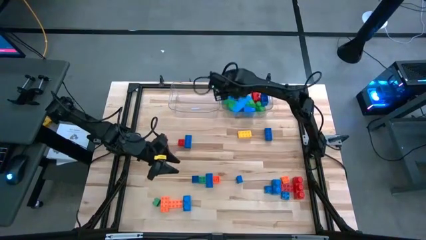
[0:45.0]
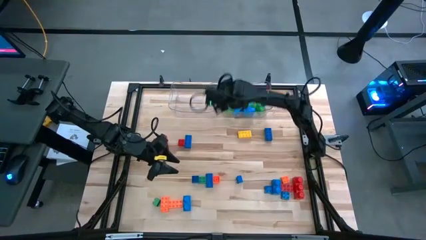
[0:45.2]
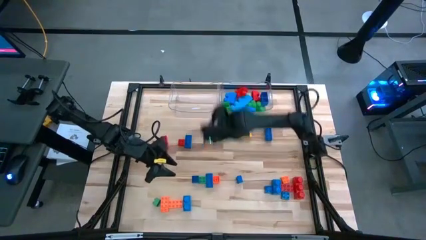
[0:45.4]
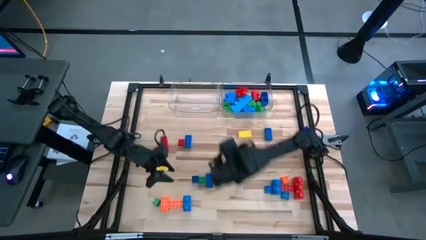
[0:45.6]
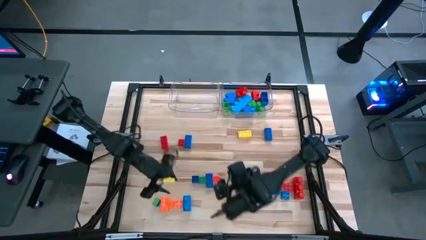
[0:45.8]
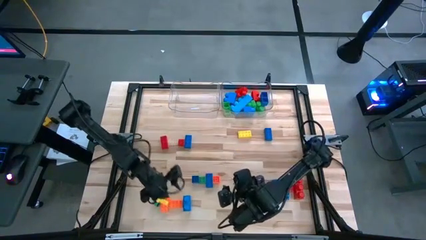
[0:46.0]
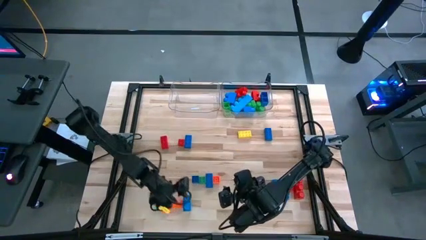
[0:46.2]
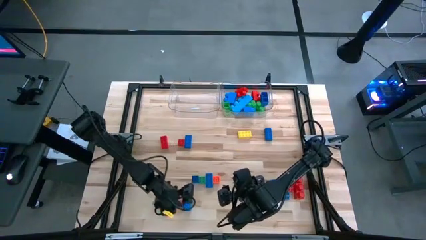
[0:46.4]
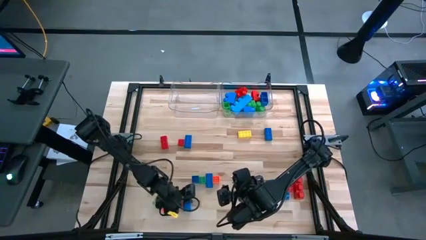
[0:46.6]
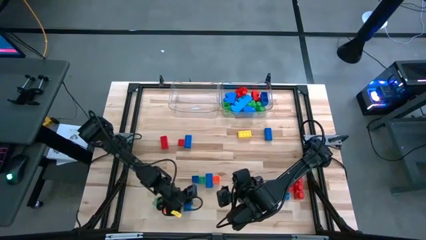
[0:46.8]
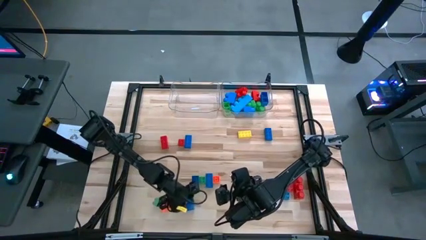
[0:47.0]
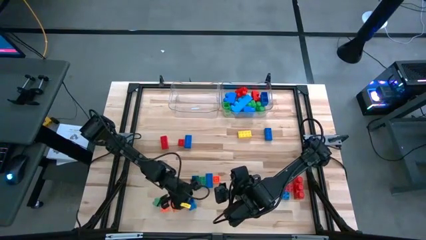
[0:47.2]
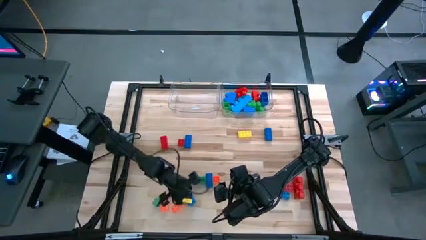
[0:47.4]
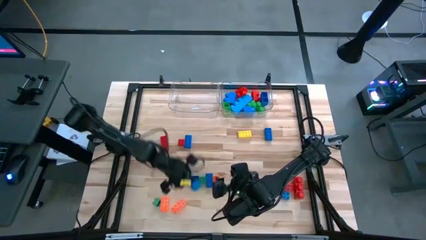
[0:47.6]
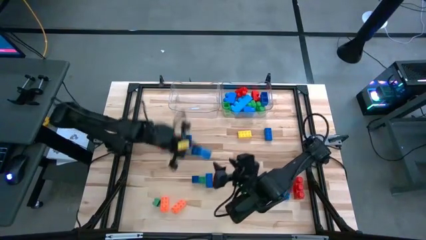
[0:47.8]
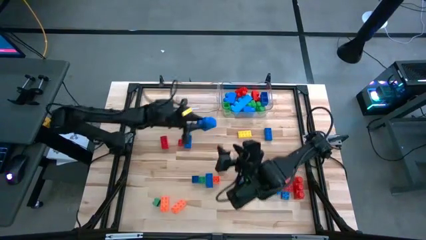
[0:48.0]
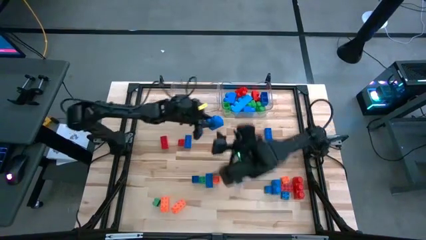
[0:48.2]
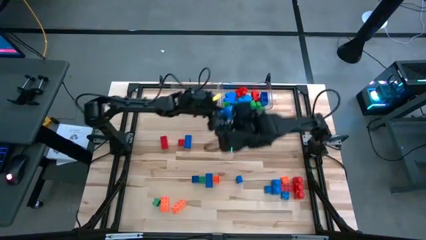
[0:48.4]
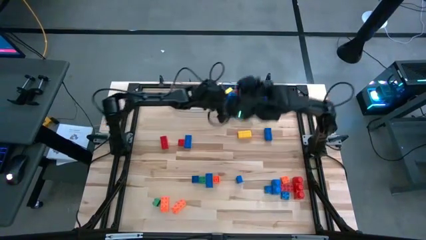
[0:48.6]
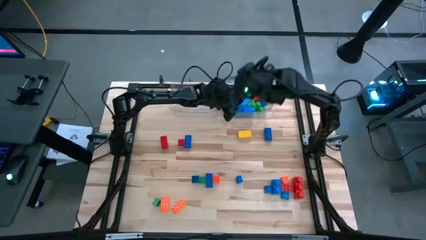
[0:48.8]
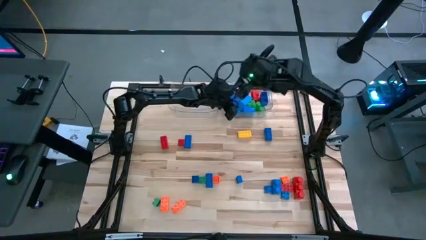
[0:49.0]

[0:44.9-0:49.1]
Task: Sort blocks by size
Put the blue lego piece into the right transparent bin

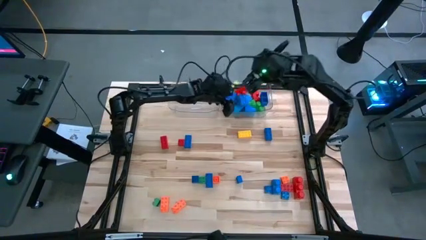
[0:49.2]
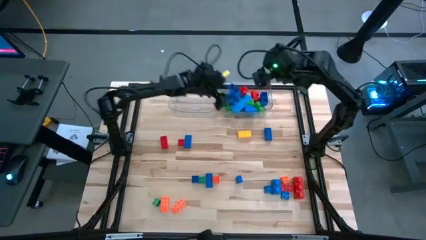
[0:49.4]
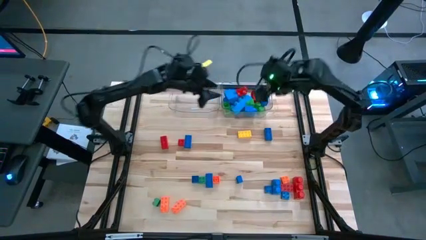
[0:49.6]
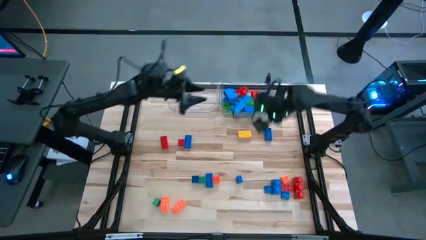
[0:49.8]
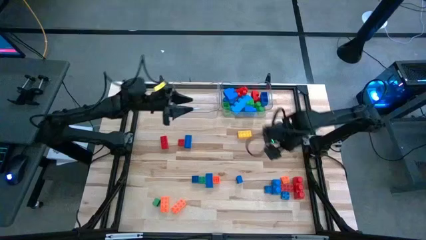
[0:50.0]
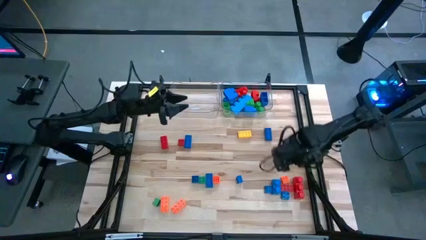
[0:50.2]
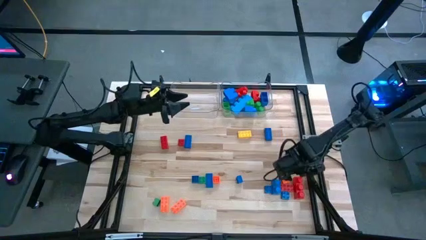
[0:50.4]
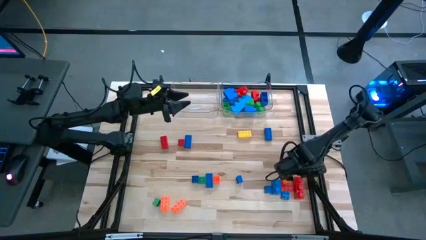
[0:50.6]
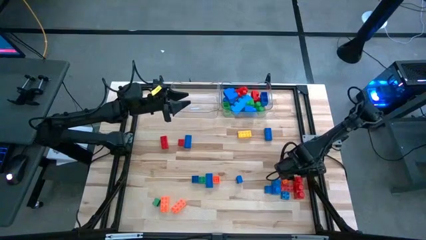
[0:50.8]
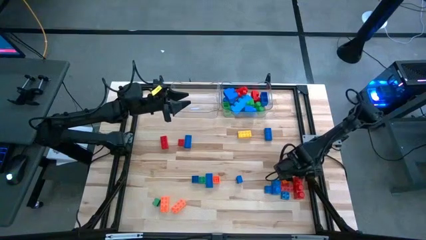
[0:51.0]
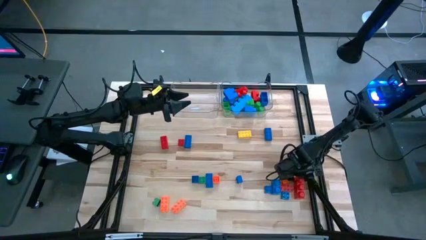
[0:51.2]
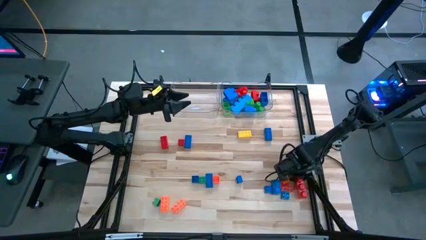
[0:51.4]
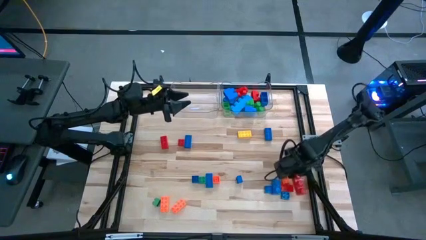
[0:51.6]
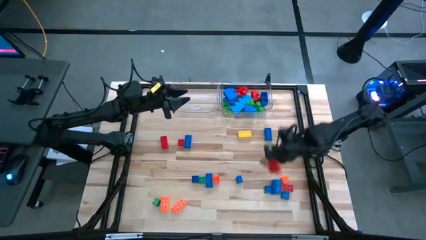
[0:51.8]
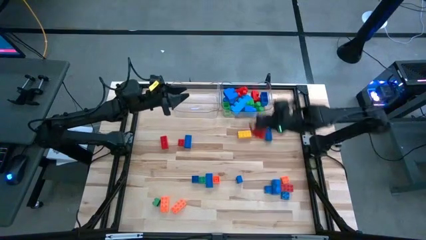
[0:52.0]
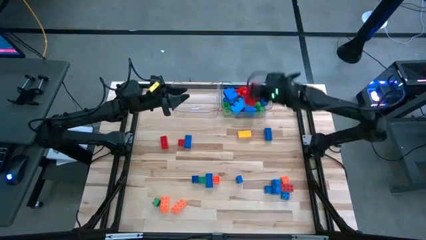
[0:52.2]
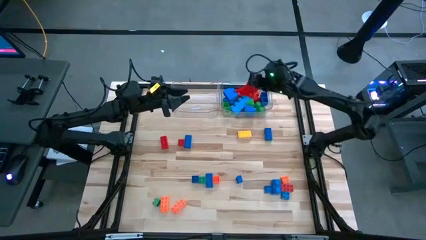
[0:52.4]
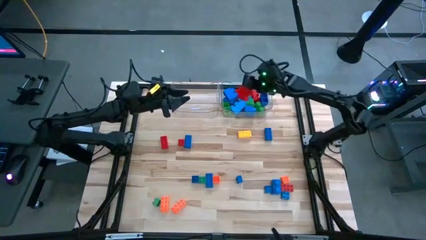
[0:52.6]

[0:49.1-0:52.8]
Put the red lego piece into the right transparent bin

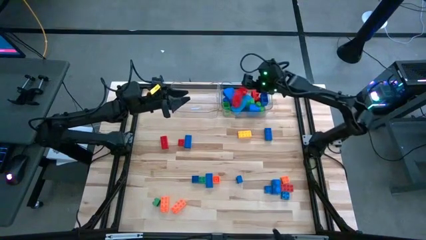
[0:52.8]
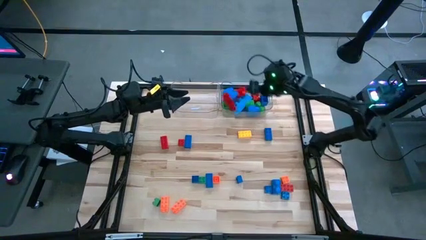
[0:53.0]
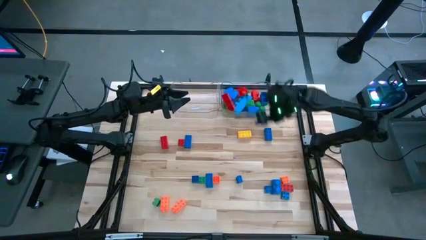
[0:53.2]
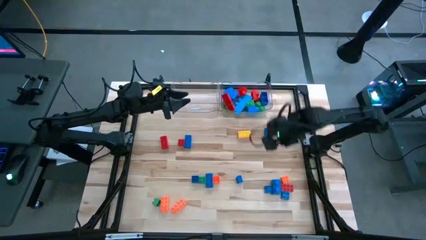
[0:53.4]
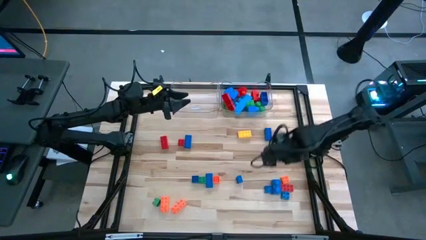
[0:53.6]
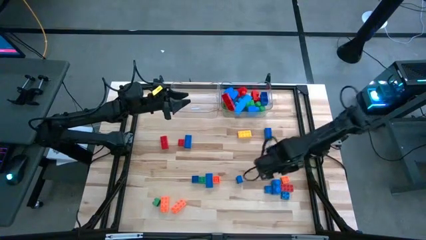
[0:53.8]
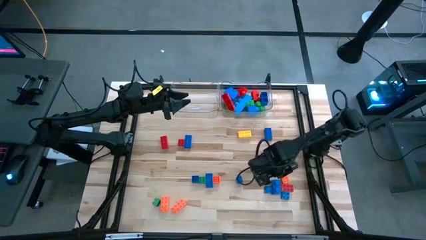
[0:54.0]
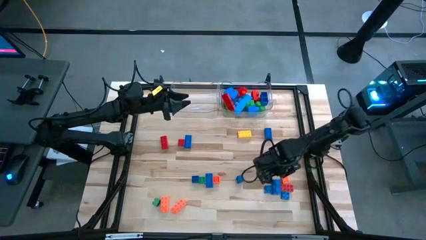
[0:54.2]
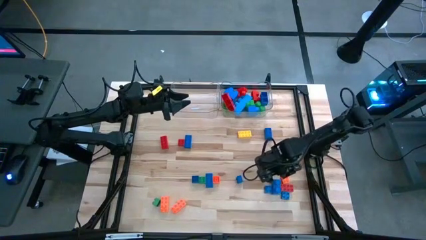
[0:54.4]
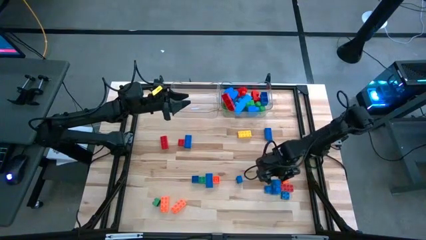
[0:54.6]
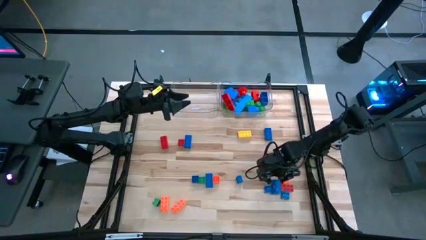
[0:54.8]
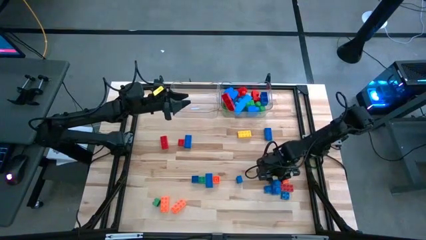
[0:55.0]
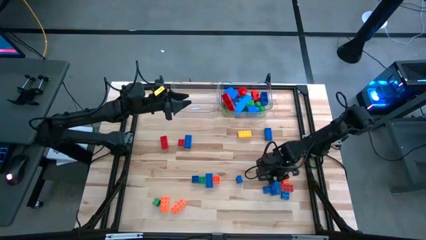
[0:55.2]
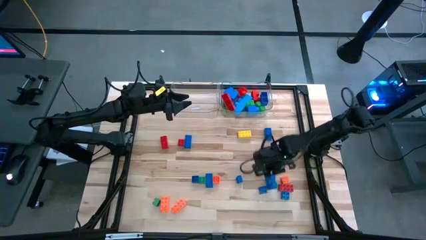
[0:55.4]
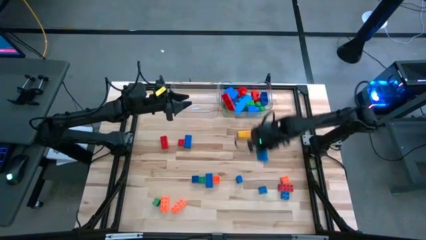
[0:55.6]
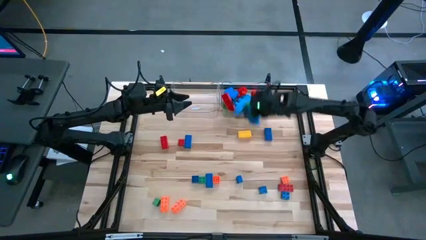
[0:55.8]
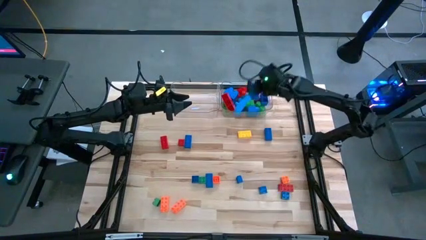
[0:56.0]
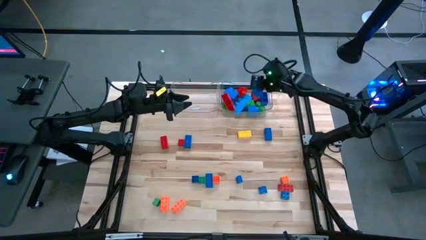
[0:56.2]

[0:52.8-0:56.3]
Put the blue lego piece into the right transparent bin

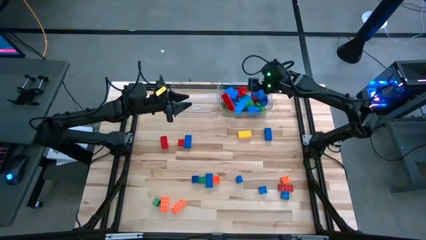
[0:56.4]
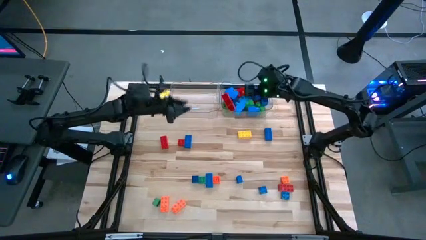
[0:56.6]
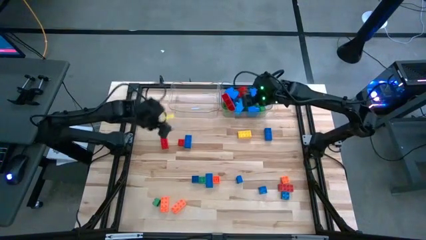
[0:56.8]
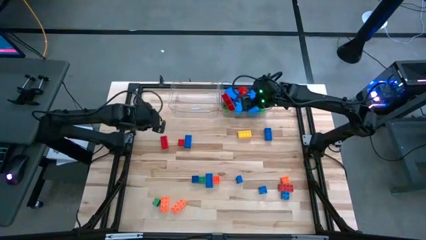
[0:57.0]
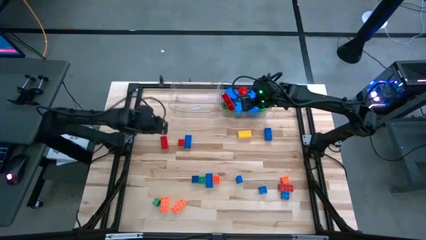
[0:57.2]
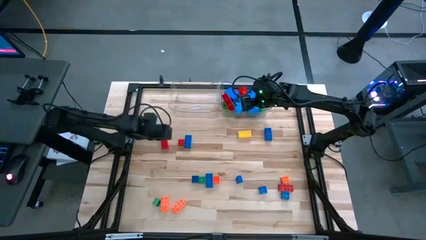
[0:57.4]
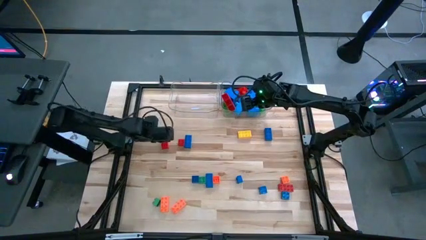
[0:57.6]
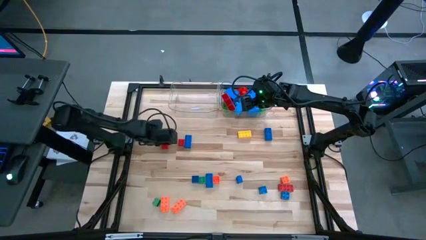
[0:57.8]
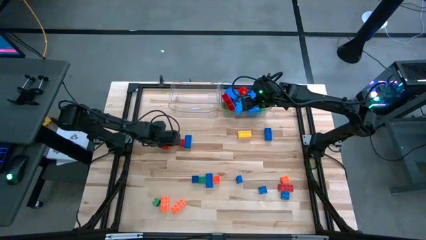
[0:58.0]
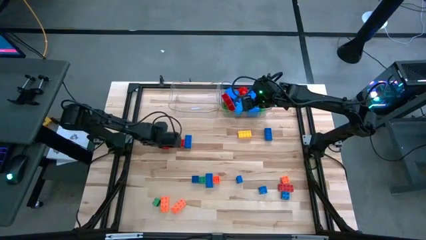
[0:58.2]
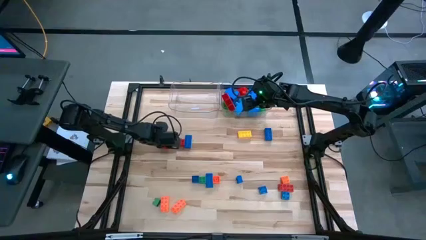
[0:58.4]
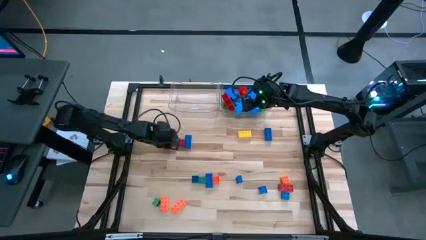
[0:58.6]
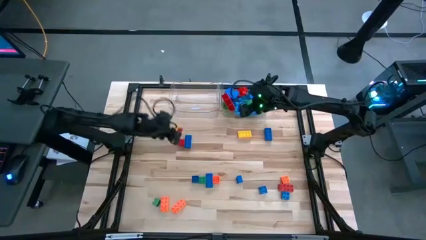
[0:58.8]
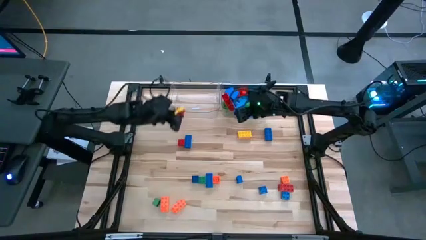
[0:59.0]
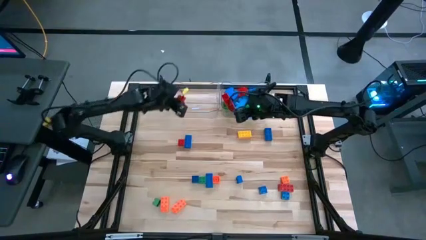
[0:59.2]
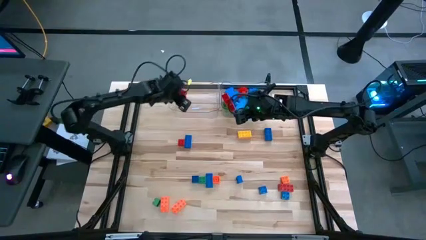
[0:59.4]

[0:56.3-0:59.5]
Put the red lego piece into the left transparent bin

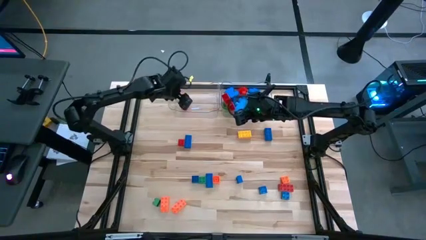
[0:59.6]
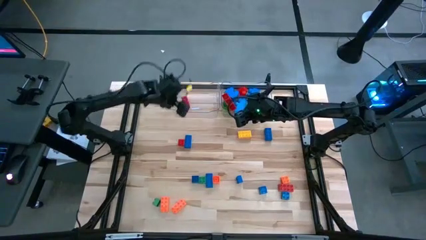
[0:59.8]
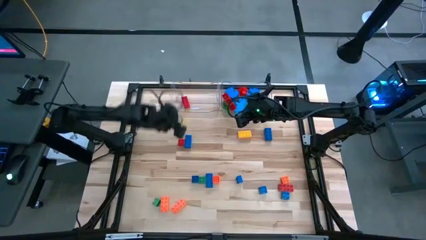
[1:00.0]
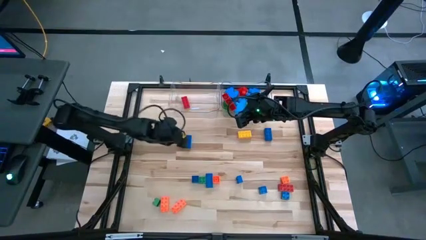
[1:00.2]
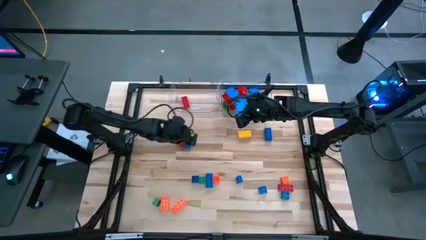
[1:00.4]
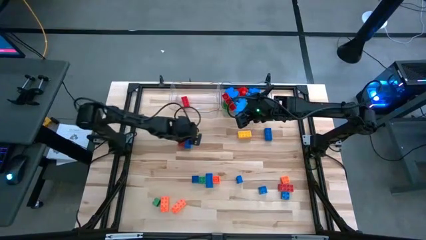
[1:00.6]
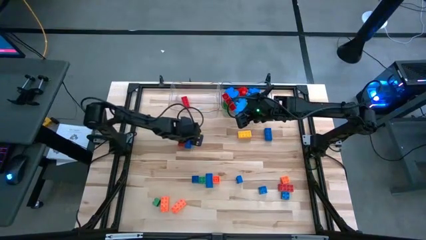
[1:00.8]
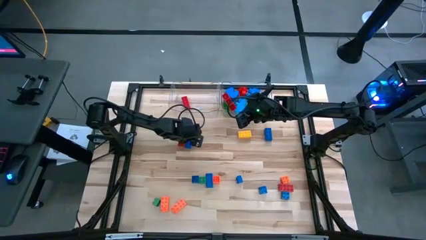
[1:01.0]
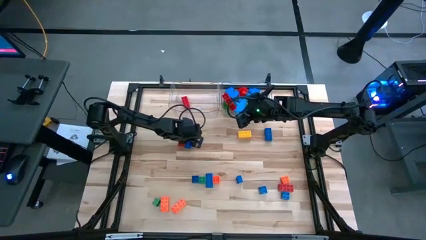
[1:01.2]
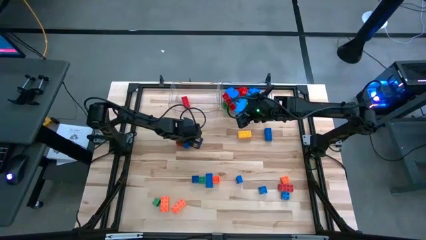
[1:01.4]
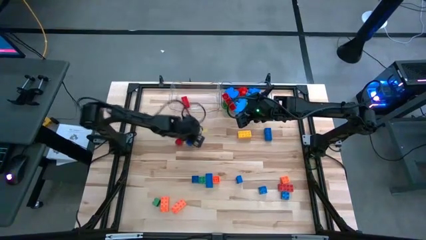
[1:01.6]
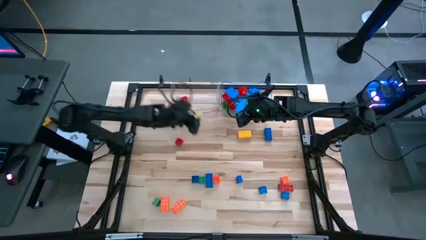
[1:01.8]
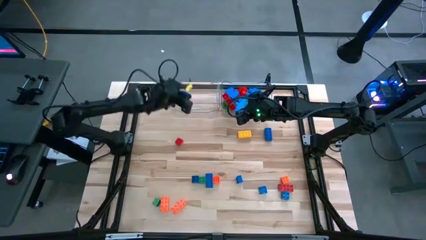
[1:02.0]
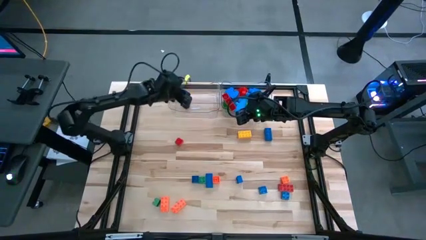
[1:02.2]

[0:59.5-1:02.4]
Put the blue lego piece into the left transparent bin
